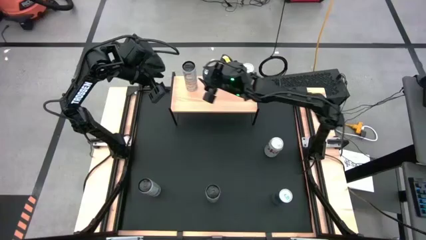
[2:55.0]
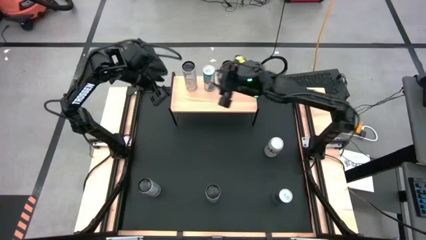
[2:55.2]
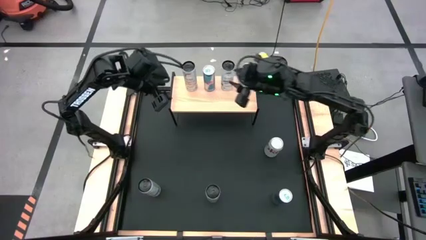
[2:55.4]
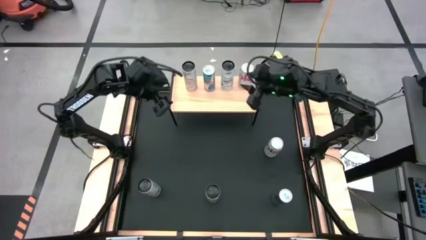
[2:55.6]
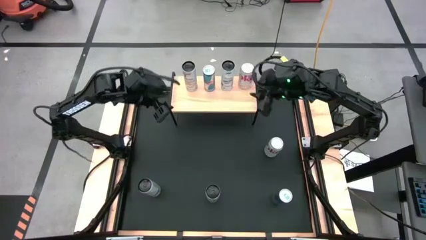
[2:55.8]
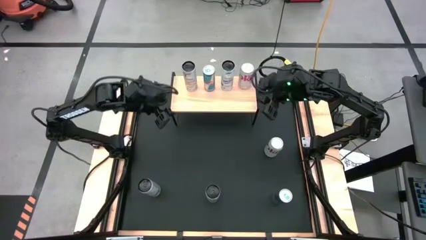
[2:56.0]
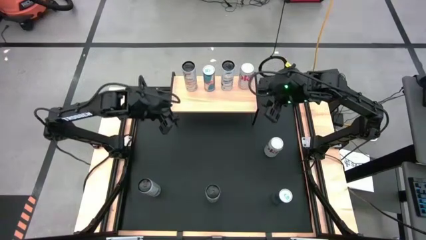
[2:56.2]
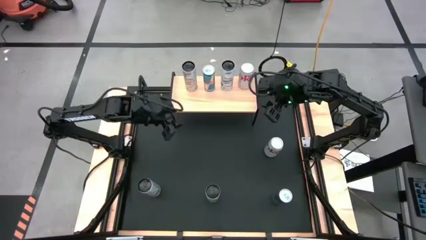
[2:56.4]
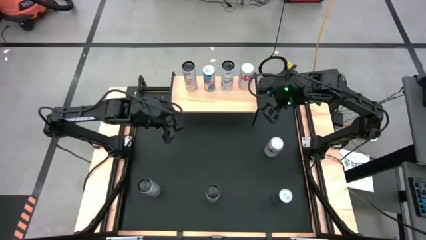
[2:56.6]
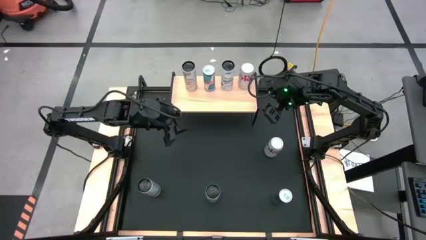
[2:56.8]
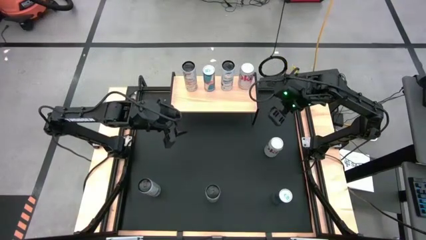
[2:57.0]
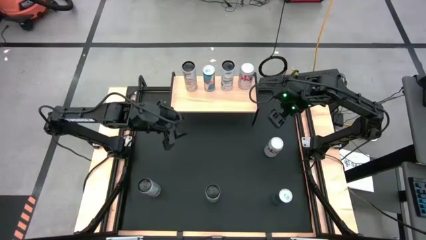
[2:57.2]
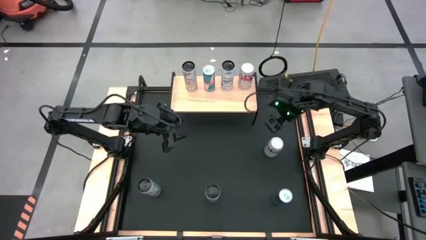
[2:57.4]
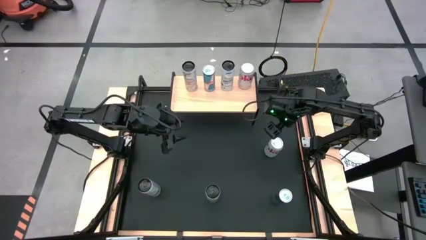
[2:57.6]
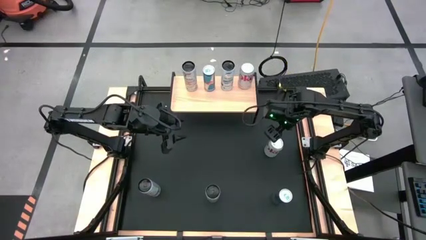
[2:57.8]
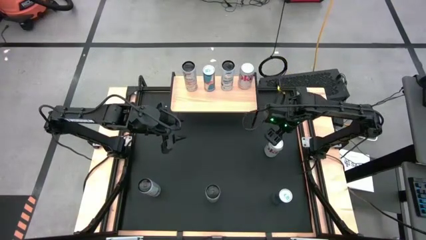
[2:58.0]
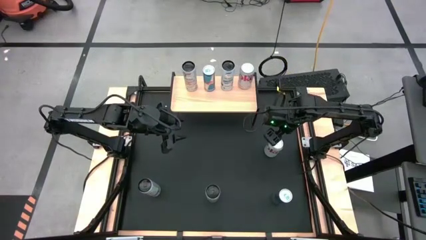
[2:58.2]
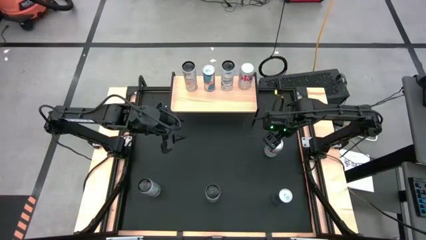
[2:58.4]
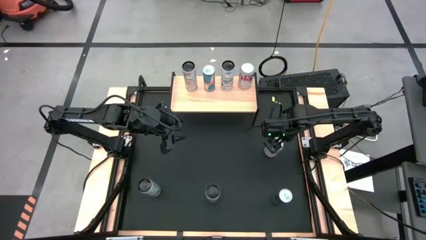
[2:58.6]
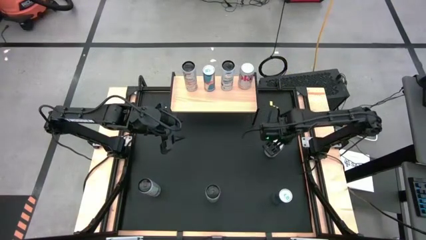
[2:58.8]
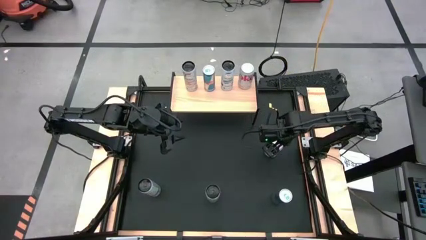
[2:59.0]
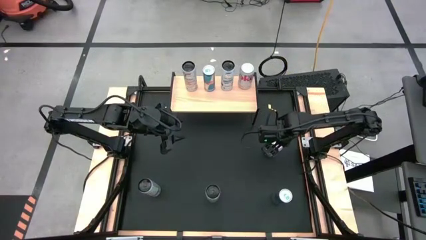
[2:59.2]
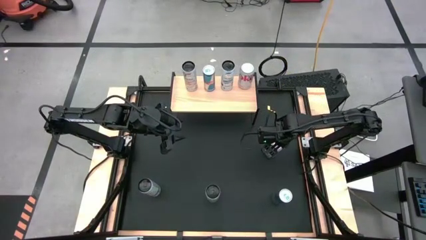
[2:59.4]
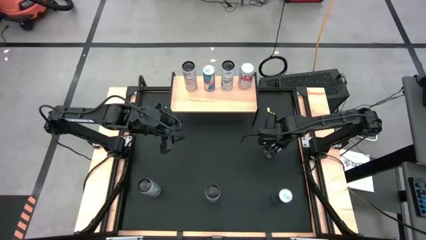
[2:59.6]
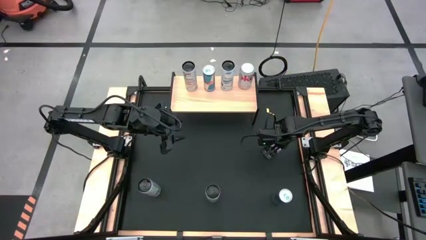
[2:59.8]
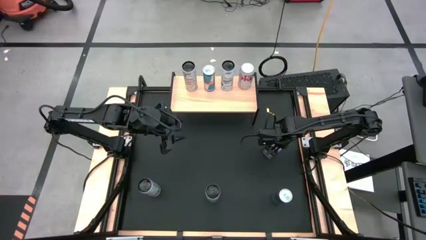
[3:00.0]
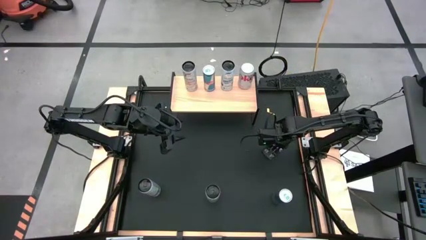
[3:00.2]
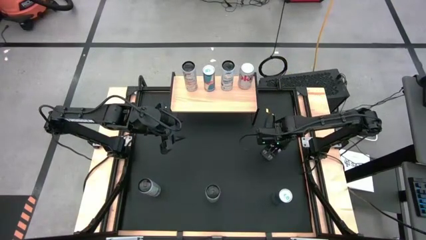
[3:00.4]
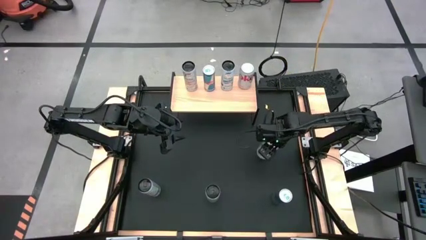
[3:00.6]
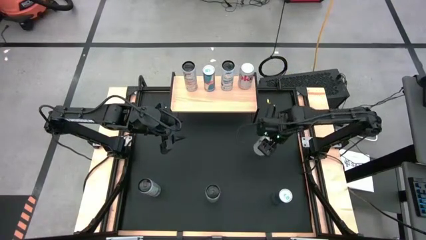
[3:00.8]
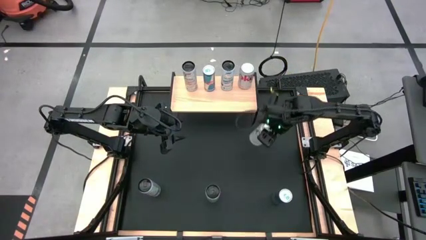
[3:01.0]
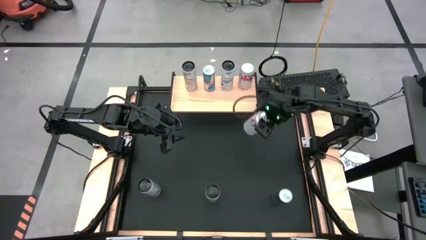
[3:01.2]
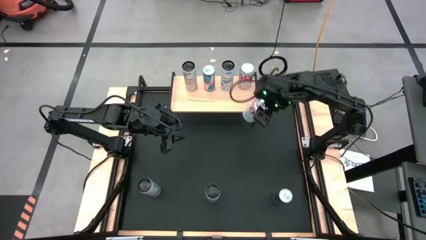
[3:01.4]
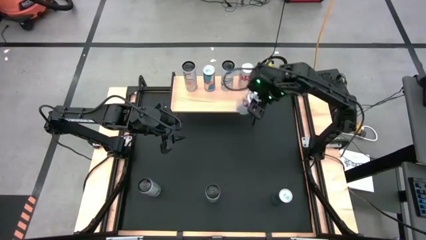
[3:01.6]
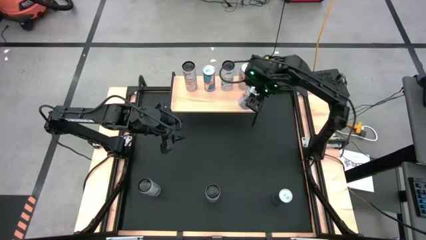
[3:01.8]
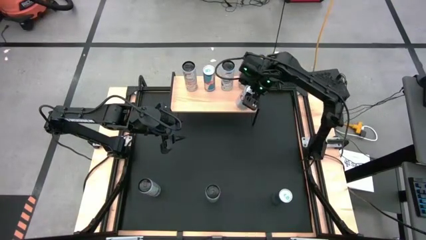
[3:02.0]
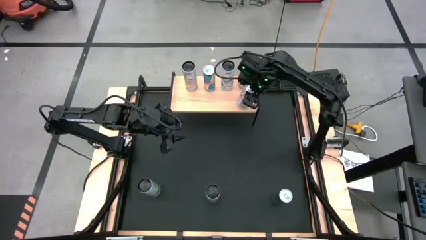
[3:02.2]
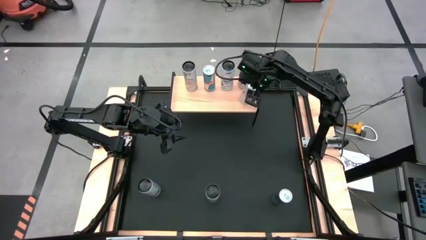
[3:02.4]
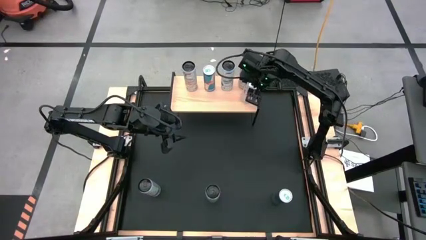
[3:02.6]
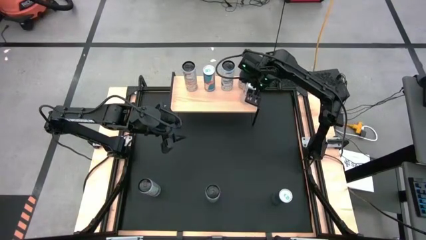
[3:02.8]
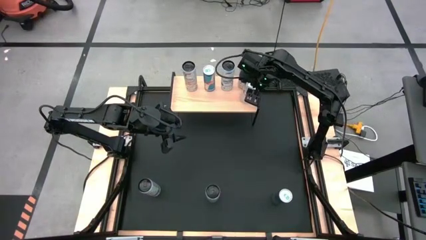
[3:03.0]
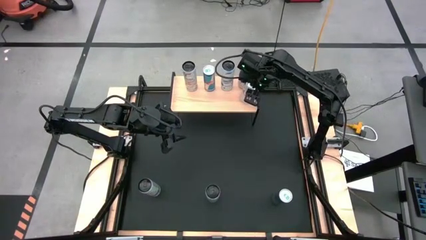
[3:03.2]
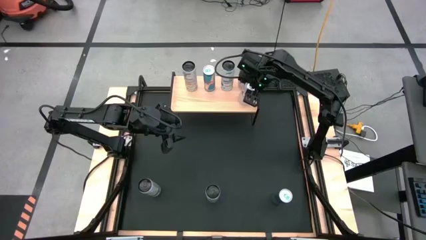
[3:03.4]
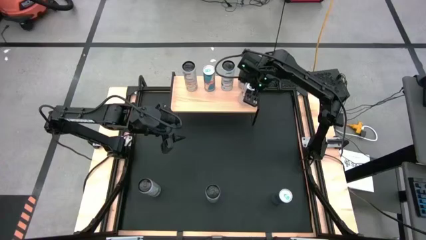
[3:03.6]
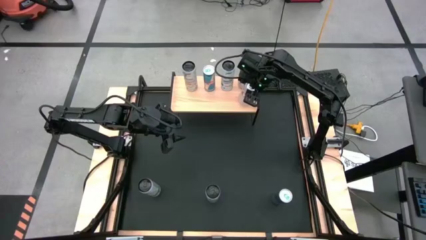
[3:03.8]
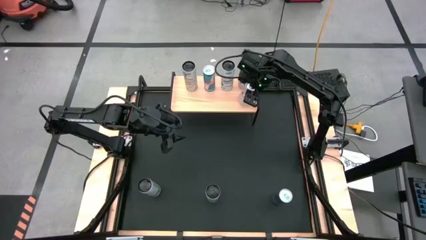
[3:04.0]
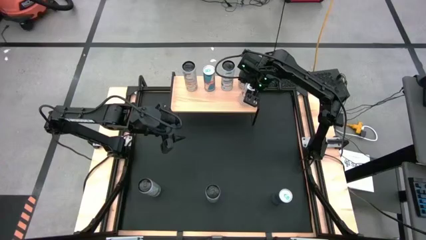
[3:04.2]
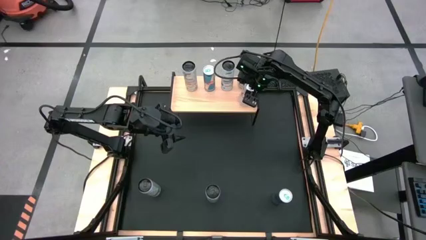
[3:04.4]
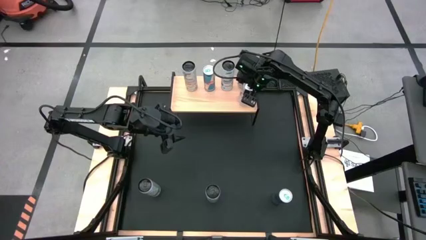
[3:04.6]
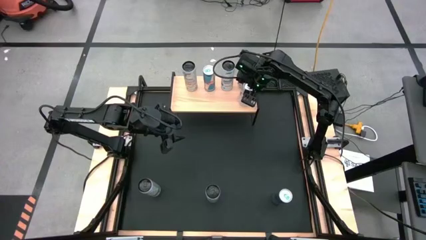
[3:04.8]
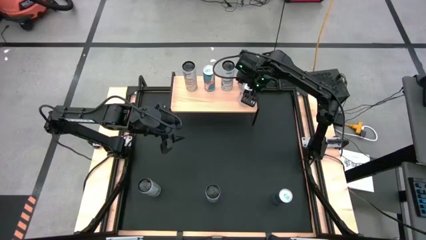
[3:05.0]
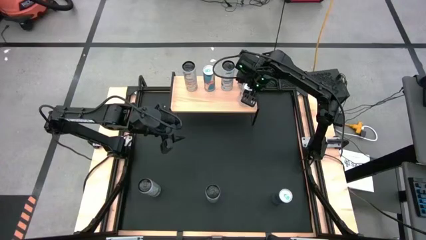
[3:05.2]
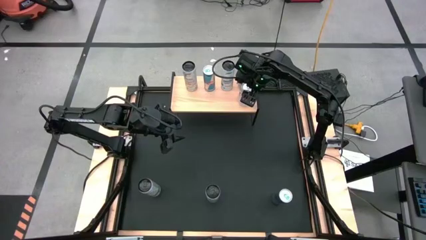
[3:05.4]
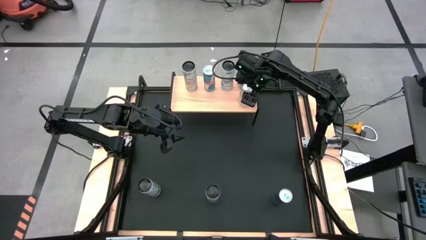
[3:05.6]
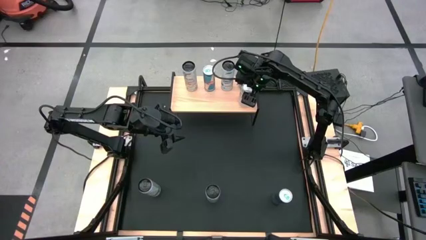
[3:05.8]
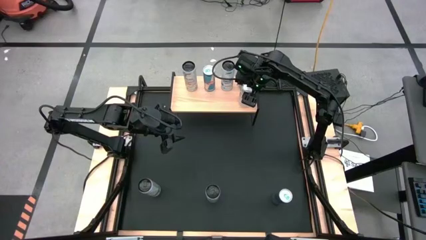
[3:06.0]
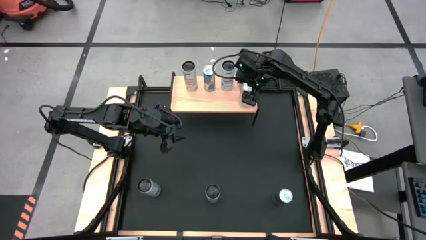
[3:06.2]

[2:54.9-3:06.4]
Task: Place canned beverage on shelf
Put the white soda can on the shelf

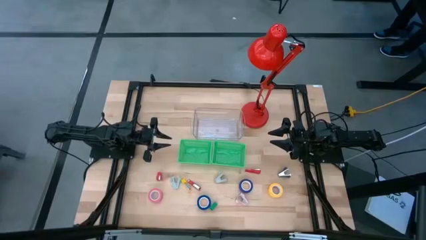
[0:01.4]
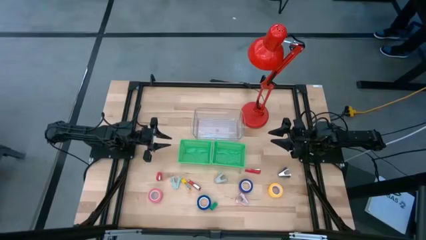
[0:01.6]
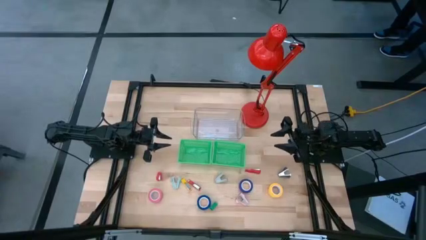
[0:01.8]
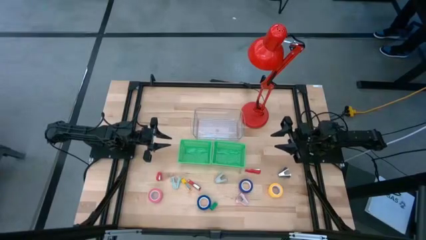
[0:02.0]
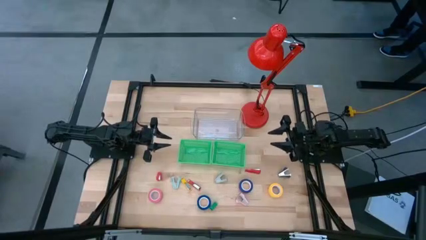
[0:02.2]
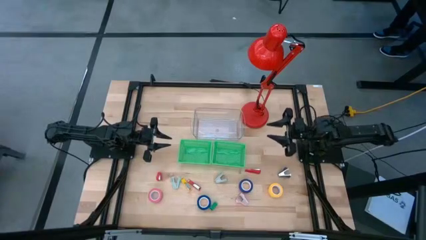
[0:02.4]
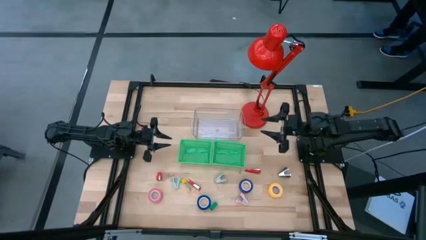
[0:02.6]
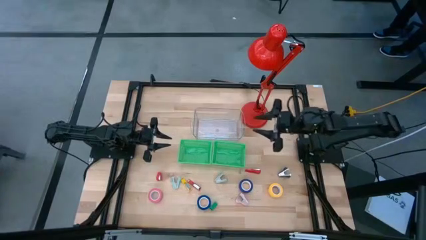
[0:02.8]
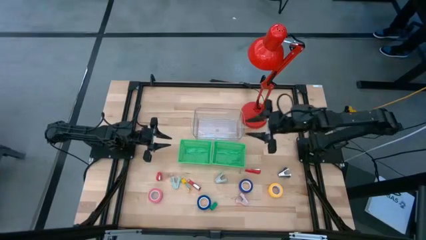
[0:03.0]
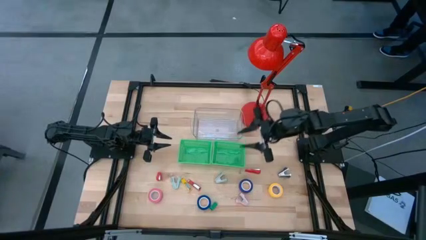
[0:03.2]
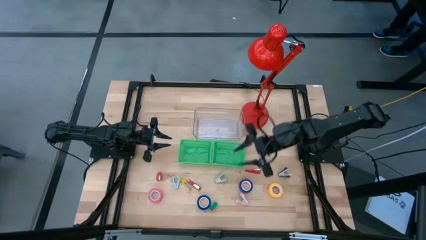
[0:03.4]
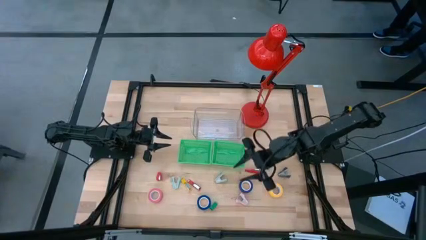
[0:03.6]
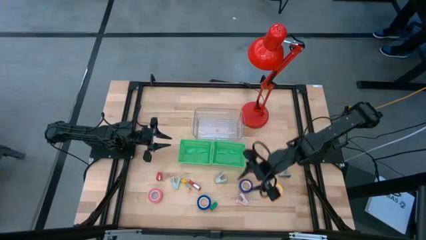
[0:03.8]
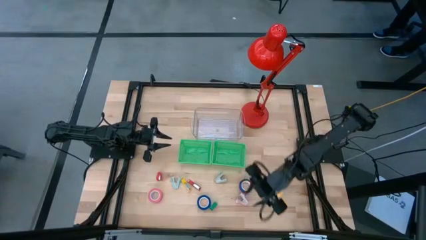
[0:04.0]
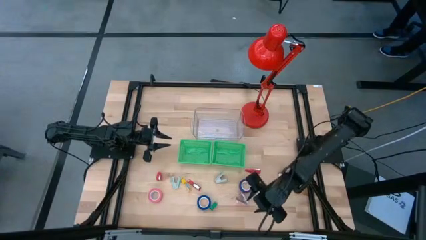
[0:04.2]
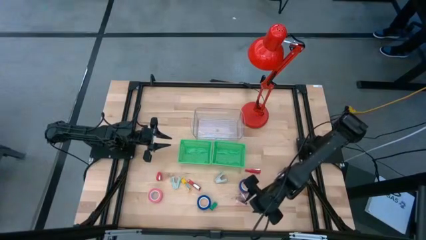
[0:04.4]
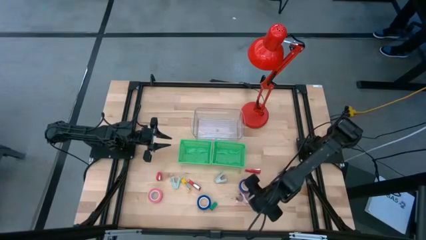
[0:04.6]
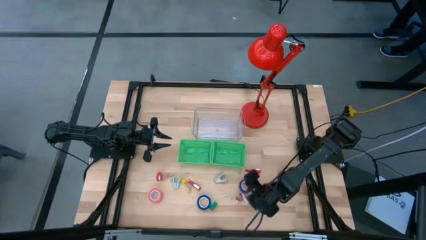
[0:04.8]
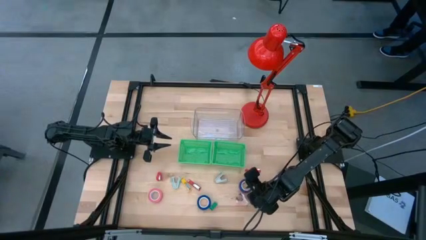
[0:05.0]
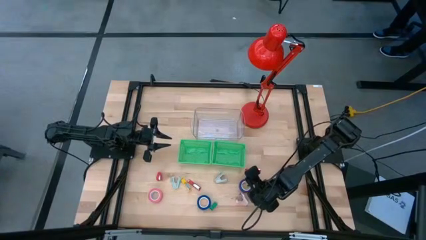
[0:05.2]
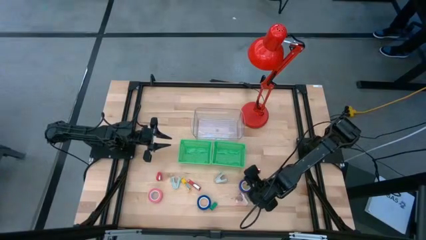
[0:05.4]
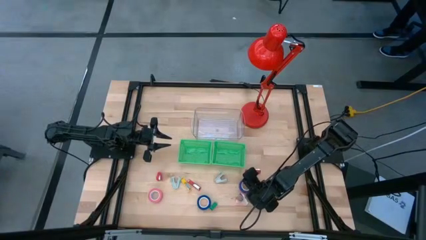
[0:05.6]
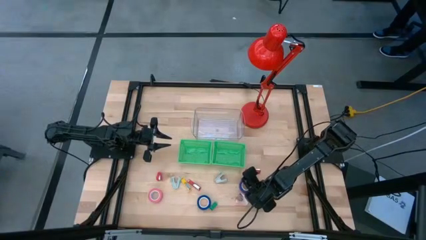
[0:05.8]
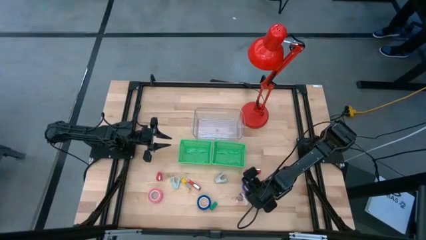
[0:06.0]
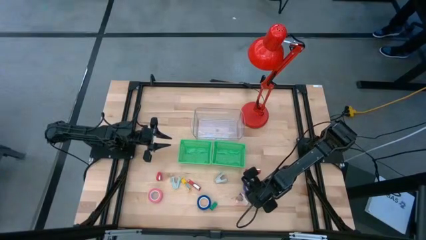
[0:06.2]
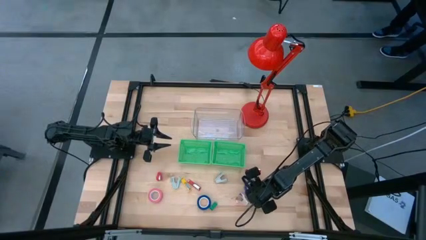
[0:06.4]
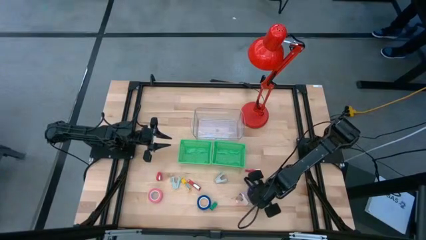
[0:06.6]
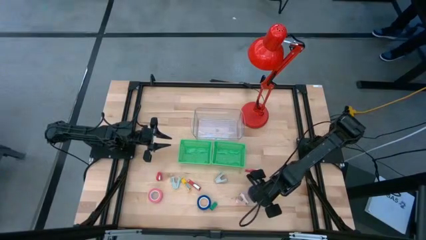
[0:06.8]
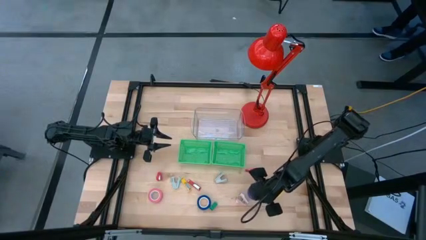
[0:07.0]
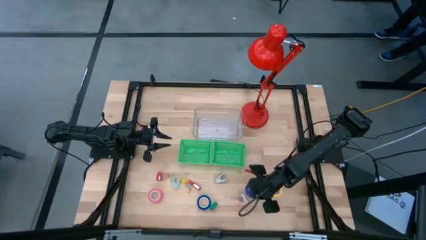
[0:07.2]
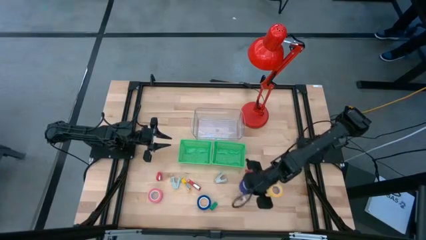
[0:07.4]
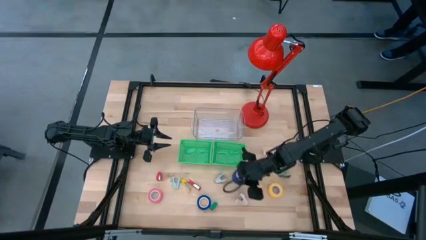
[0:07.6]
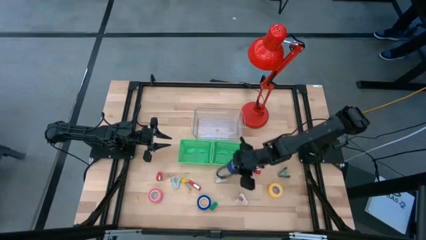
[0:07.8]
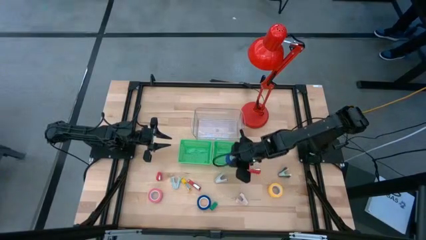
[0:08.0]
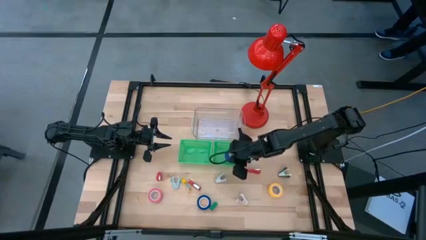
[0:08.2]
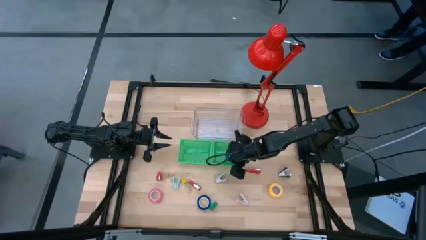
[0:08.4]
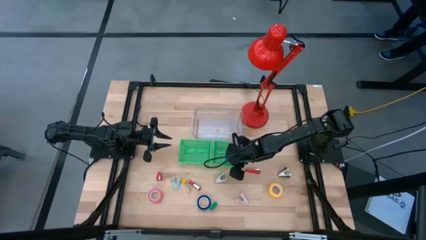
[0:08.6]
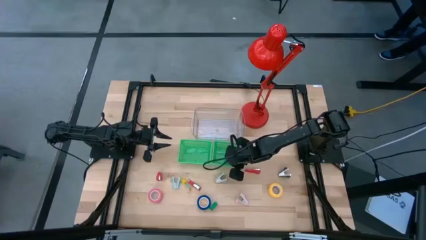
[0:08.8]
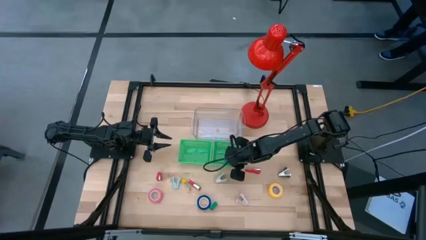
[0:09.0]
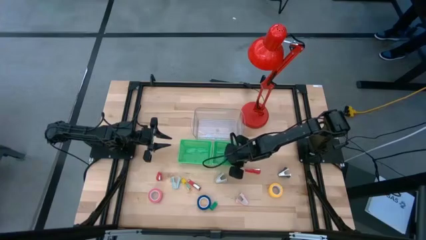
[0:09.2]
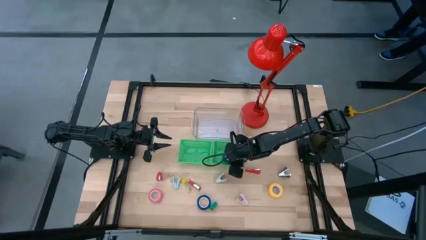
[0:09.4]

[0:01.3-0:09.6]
Task: Pick and place Stapler, Stapler remover, tape
Put the top blue tape into the right green bin
